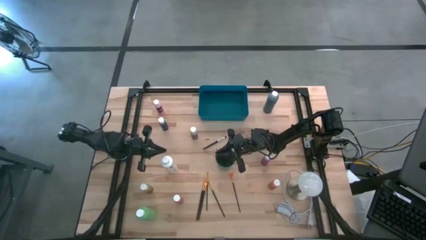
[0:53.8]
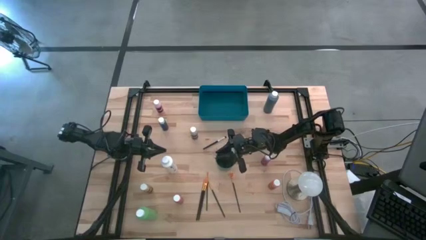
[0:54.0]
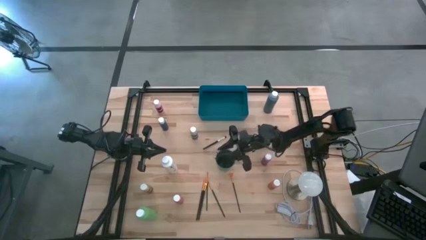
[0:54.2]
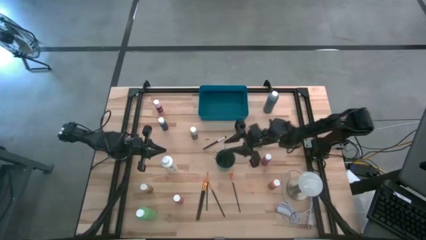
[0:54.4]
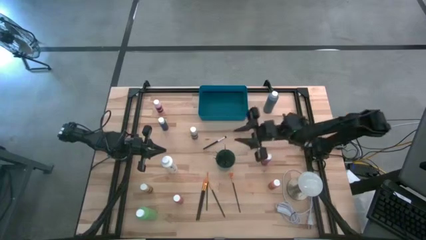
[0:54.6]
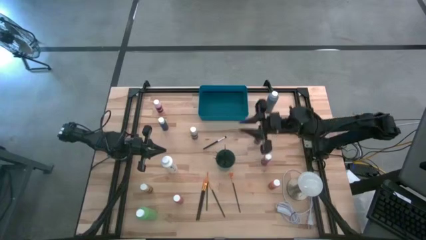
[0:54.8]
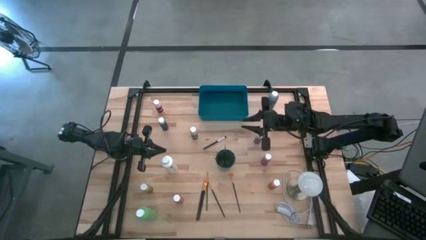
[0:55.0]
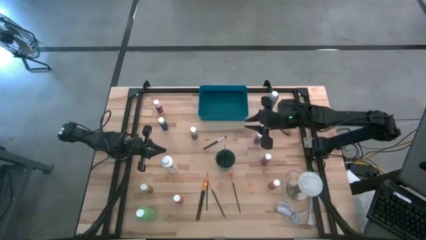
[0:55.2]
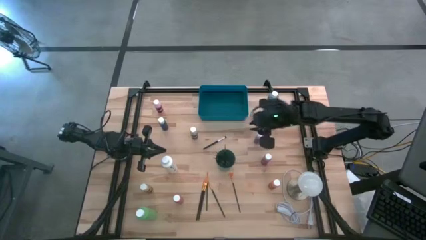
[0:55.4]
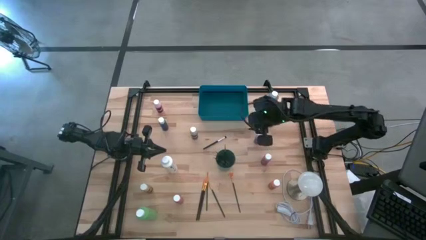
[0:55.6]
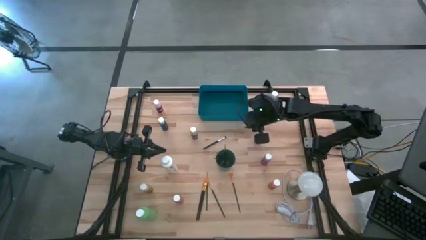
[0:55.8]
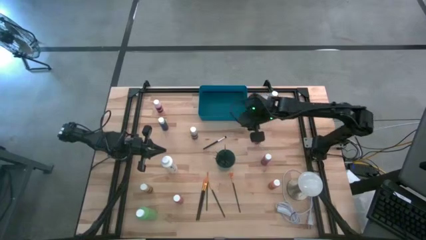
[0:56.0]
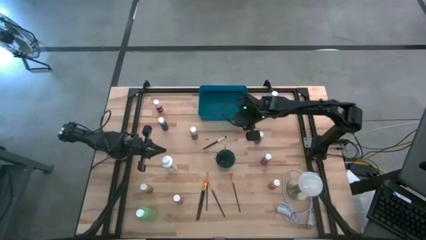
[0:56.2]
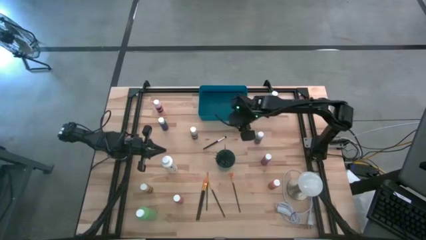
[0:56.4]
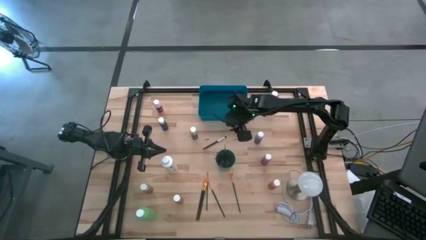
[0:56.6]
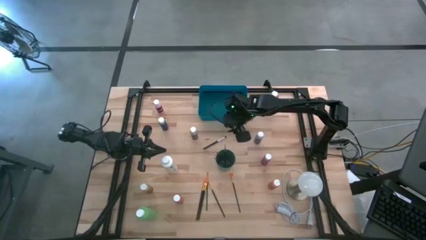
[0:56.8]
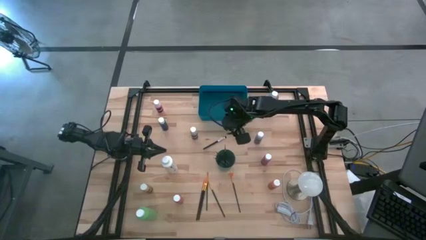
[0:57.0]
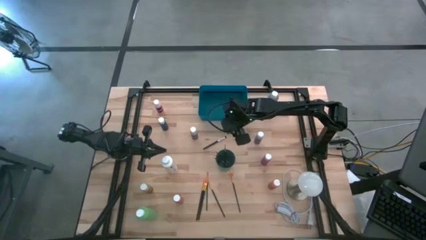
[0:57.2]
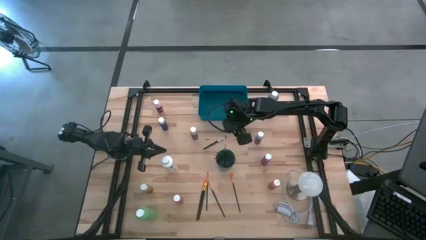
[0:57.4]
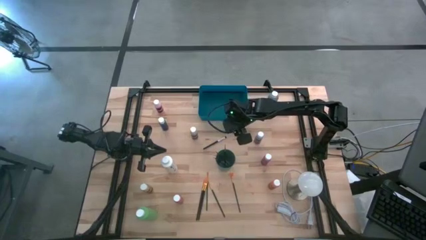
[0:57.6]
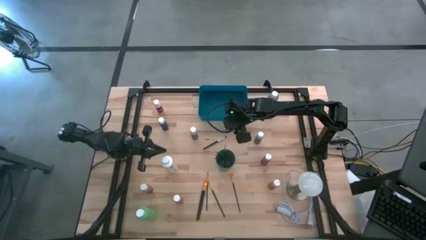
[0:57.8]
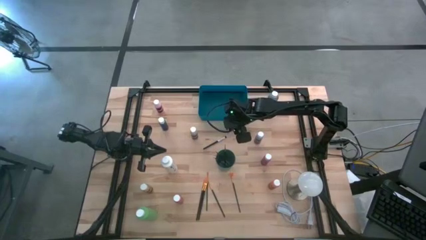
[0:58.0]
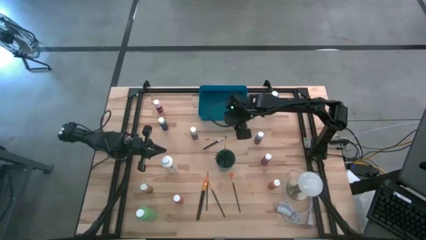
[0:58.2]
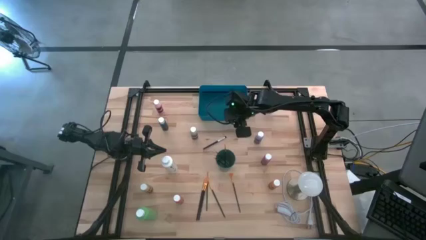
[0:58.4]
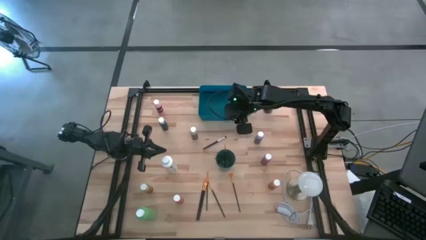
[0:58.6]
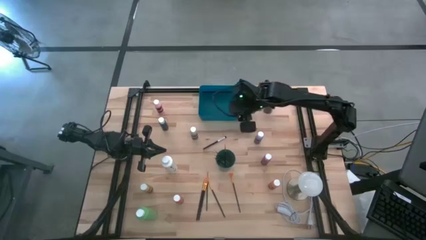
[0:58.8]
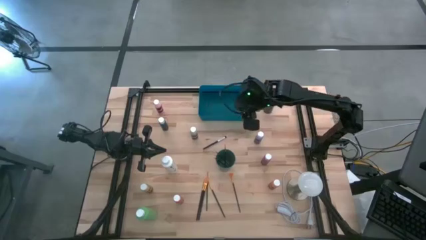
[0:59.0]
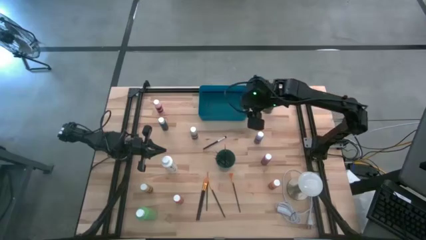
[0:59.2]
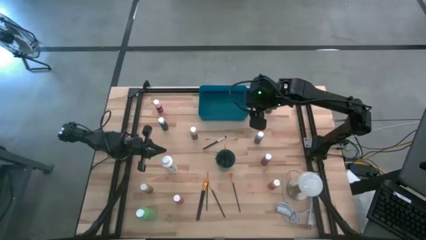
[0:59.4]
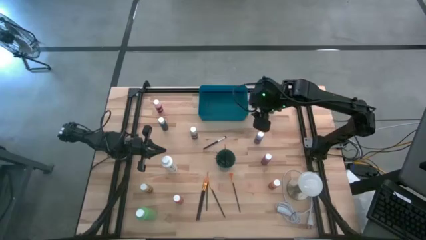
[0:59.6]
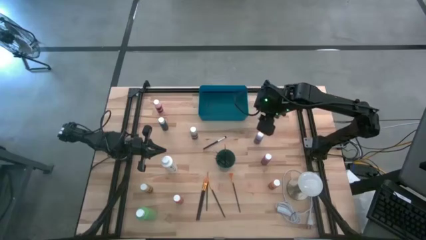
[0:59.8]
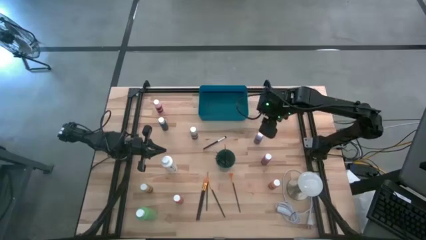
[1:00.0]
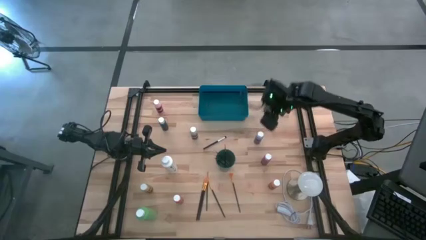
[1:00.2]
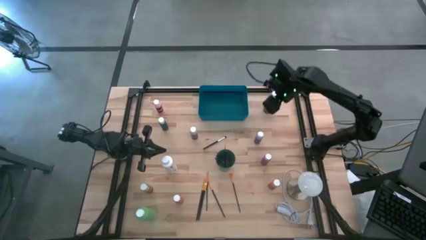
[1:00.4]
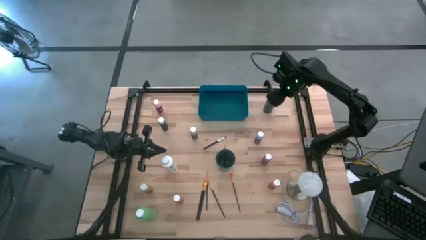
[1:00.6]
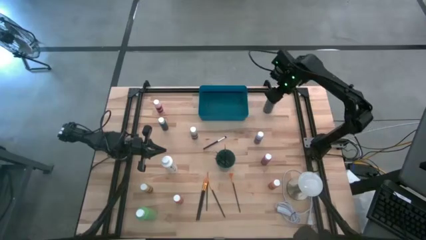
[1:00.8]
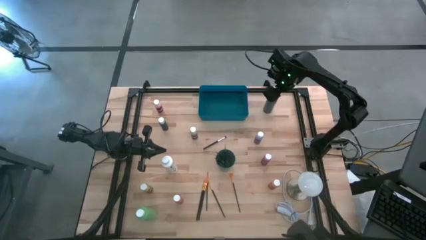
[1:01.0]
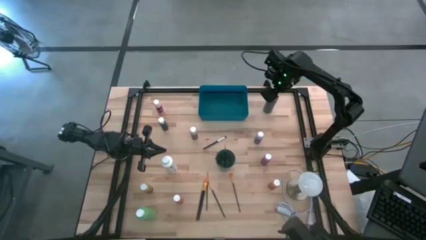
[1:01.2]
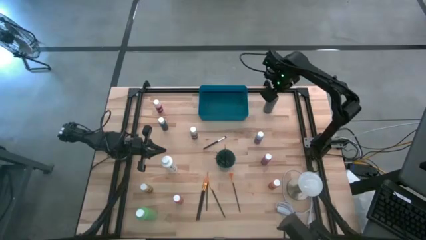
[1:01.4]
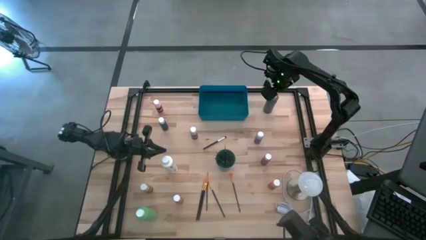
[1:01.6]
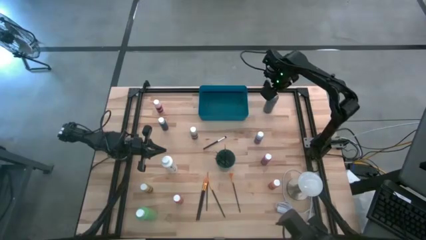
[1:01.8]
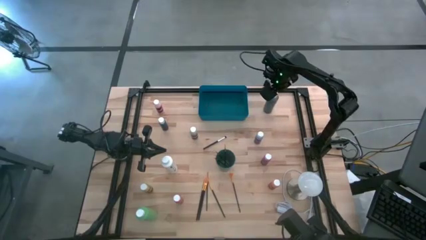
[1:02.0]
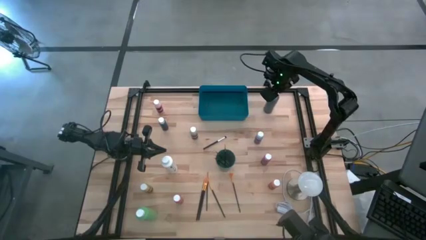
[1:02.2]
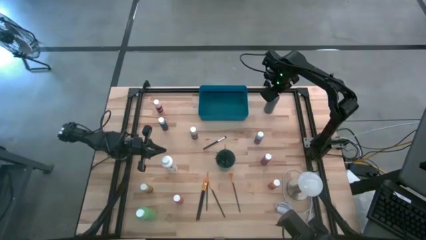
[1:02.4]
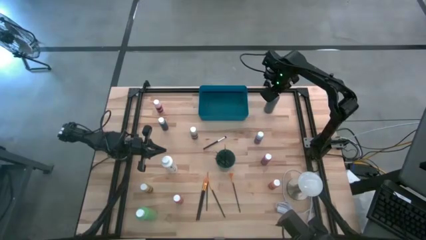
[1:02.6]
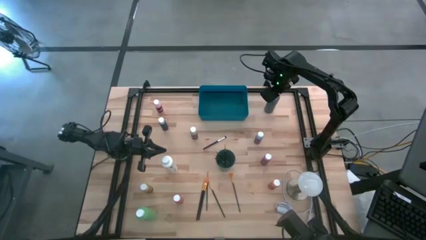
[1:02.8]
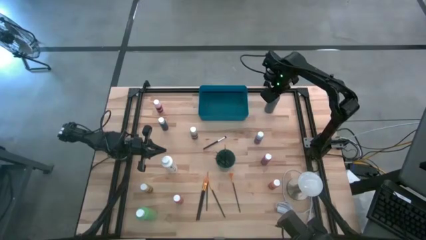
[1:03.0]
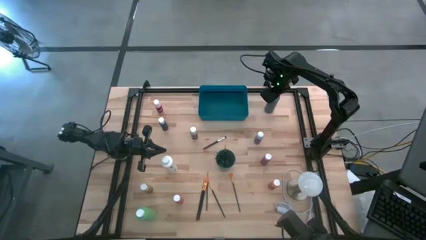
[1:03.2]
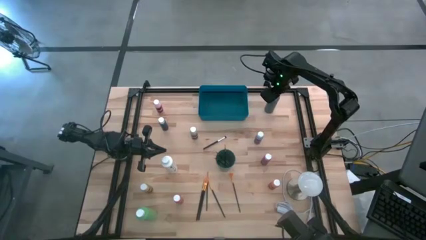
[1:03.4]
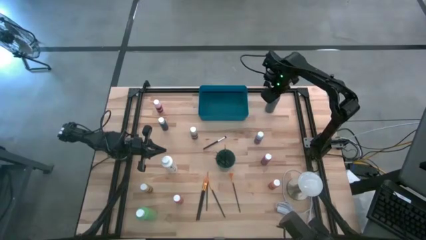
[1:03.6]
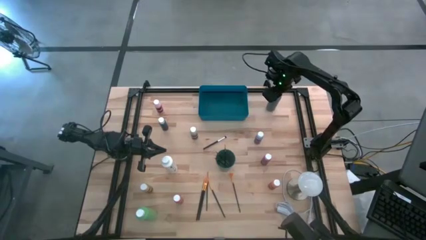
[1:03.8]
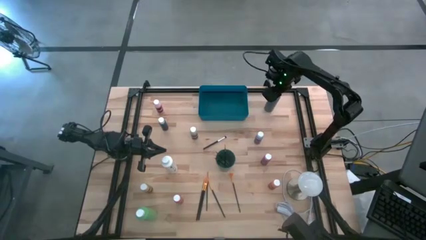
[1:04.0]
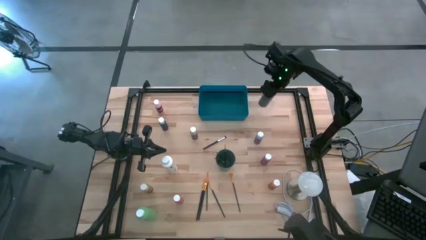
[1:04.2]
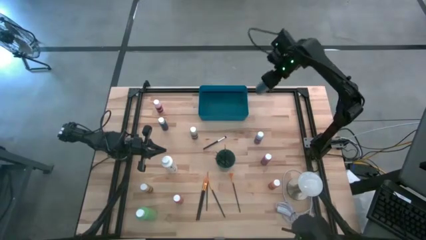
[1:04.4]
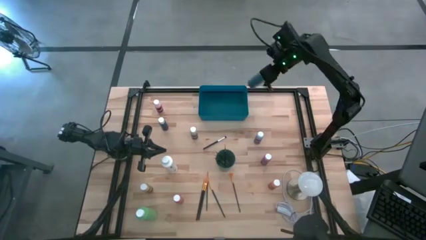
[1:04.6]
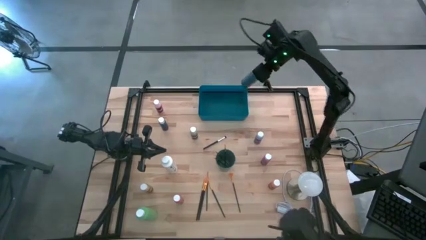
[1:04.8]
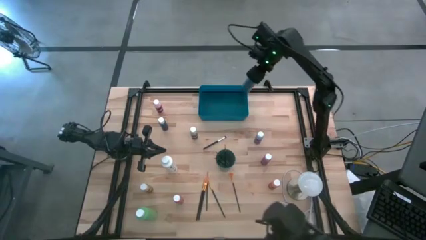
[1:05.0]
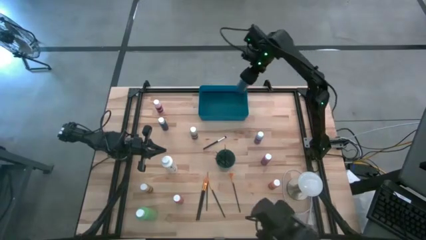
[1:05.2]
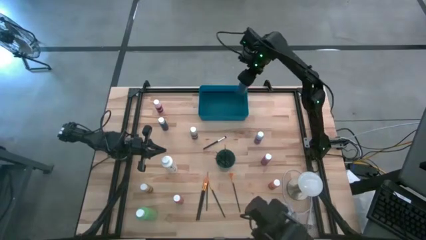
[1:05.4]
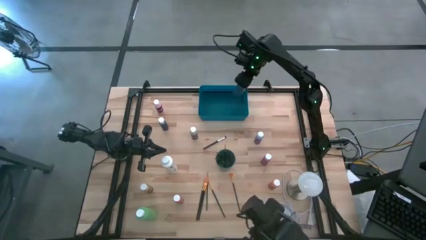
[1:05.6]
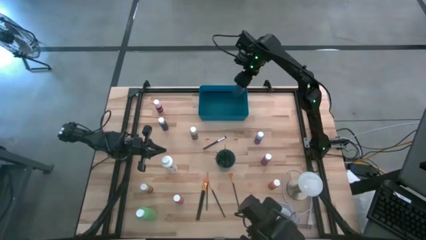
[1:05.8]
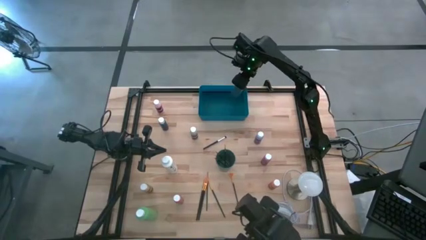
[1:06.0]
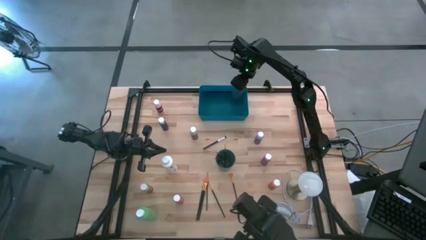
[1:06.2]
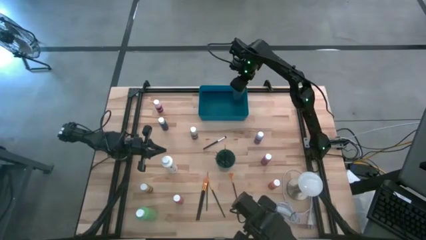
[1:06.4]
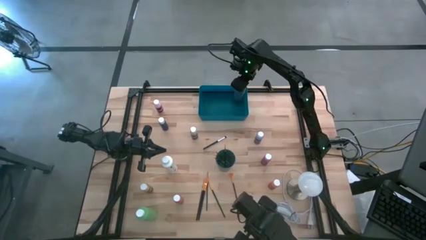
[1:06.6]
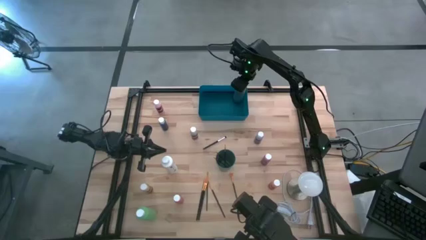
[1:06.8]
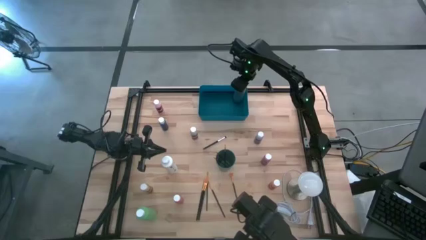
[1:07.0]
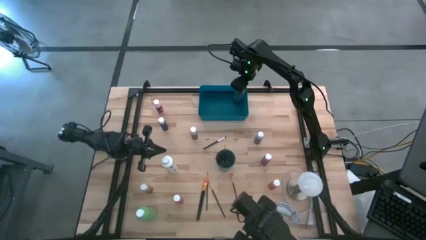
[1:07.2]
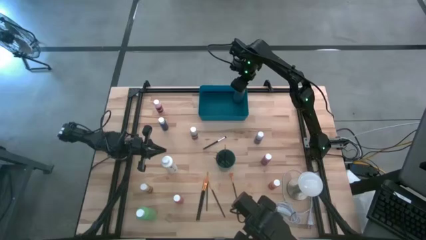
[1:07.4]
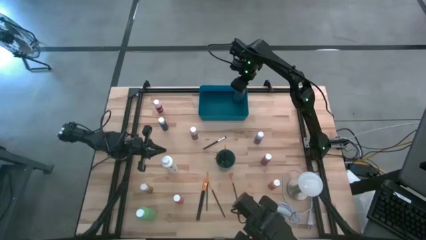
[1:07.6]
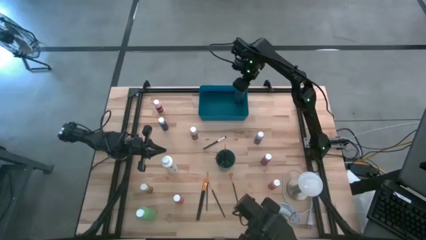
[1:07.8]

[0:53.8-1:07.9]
Task: Pick & Place Paint Supplies
Put the blue paint bottle into the blue bin
